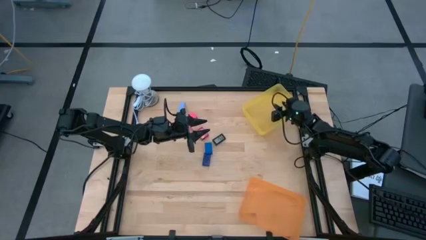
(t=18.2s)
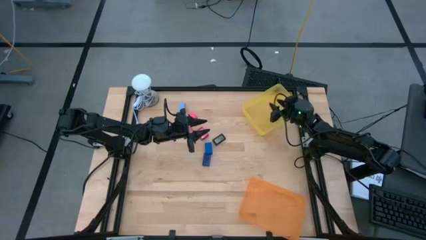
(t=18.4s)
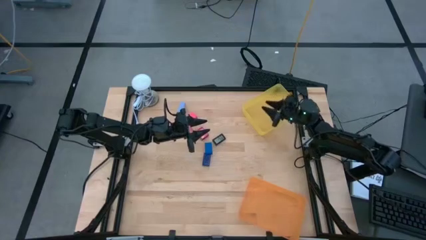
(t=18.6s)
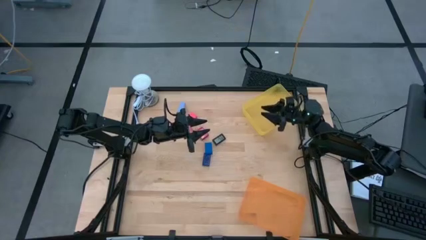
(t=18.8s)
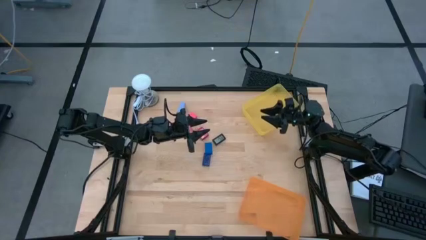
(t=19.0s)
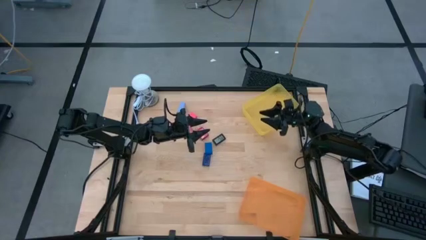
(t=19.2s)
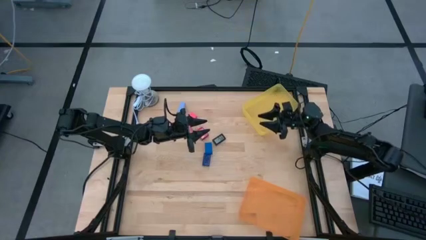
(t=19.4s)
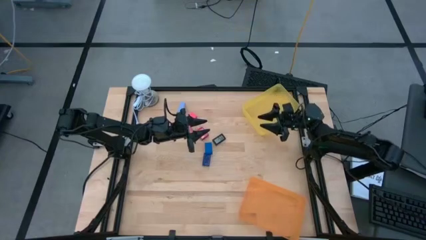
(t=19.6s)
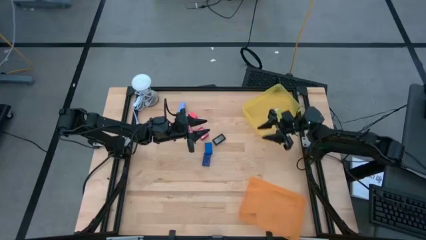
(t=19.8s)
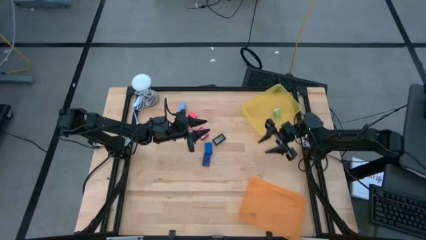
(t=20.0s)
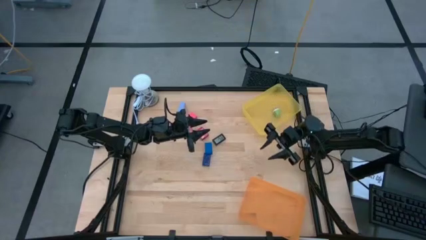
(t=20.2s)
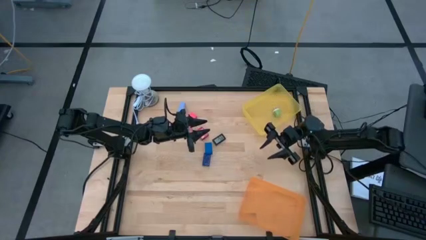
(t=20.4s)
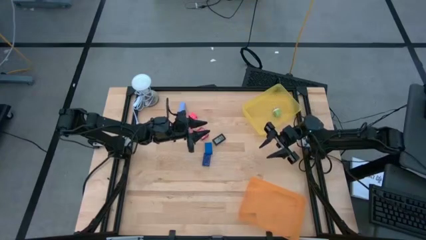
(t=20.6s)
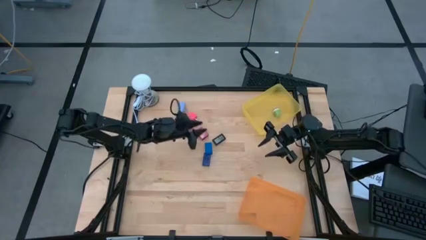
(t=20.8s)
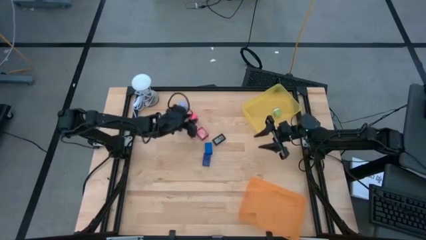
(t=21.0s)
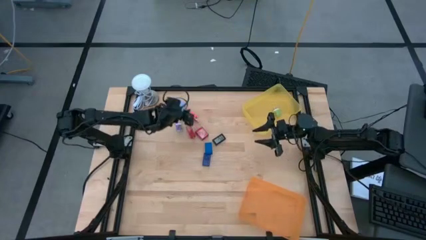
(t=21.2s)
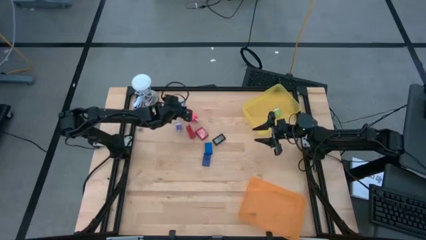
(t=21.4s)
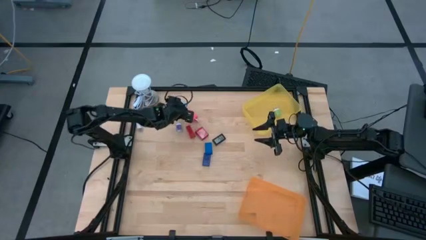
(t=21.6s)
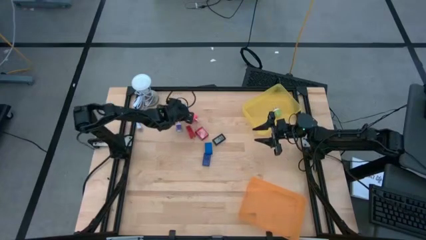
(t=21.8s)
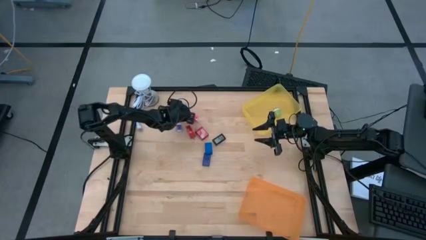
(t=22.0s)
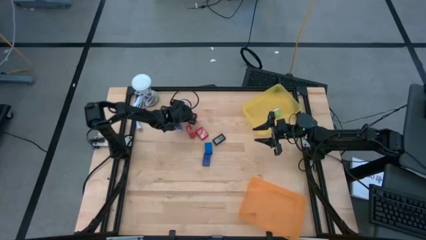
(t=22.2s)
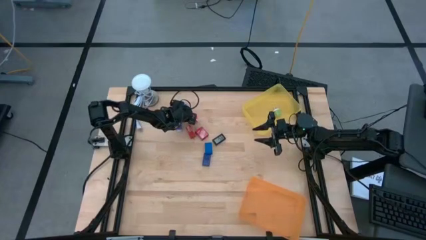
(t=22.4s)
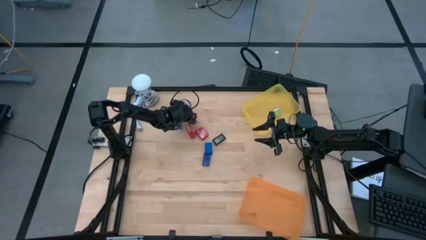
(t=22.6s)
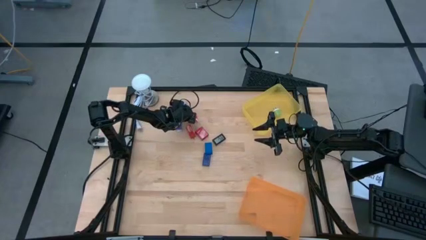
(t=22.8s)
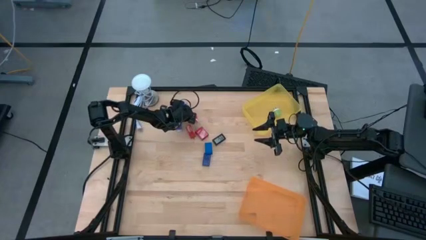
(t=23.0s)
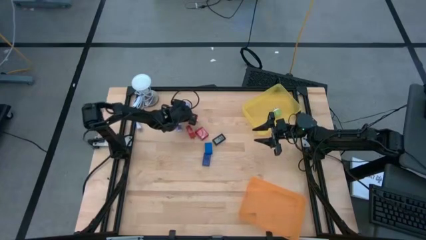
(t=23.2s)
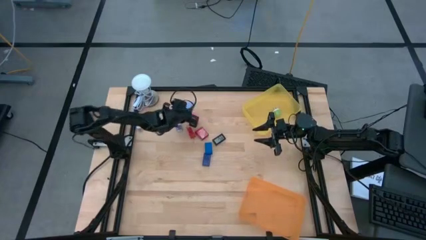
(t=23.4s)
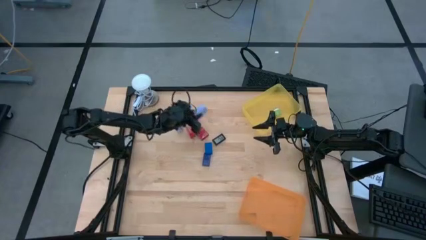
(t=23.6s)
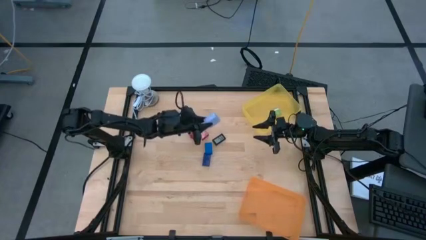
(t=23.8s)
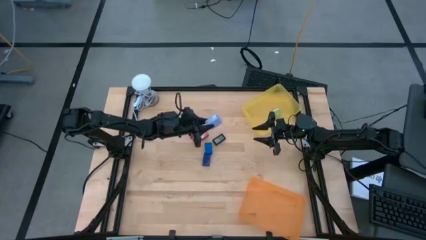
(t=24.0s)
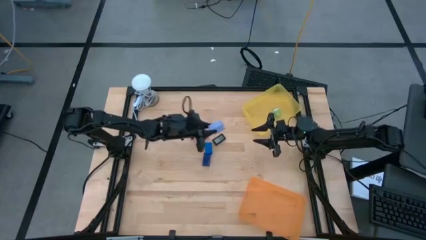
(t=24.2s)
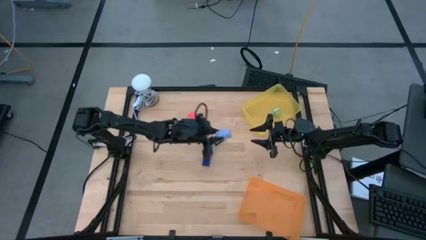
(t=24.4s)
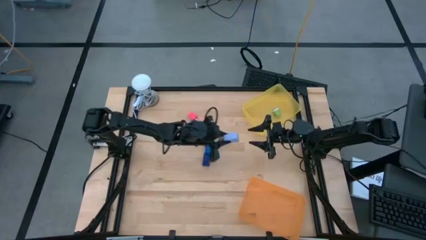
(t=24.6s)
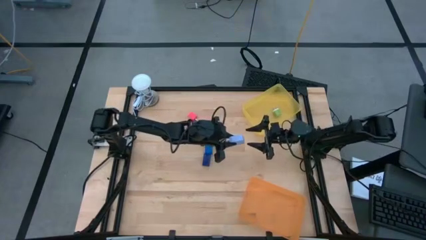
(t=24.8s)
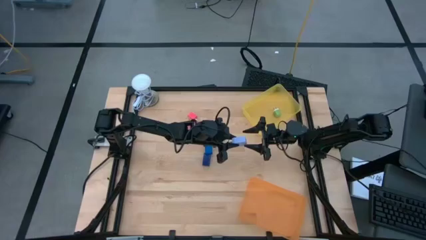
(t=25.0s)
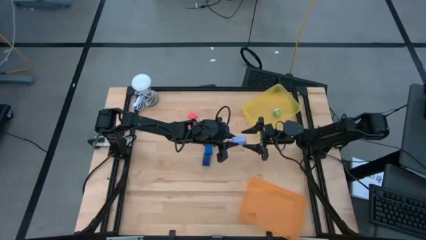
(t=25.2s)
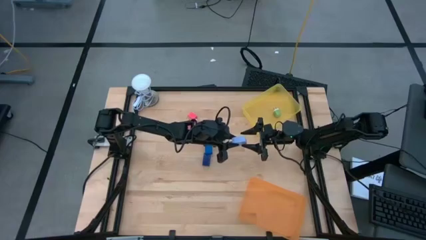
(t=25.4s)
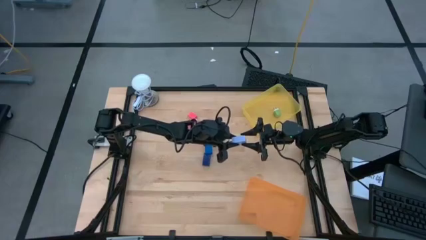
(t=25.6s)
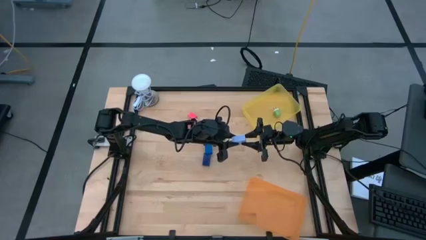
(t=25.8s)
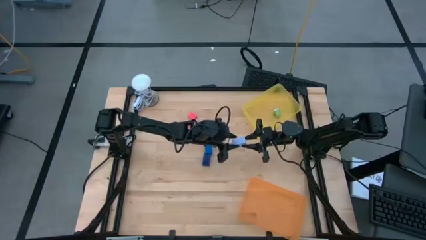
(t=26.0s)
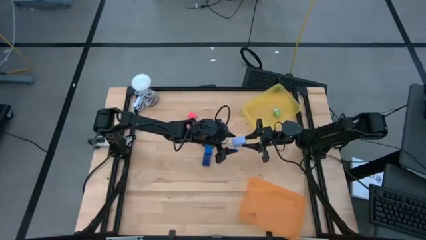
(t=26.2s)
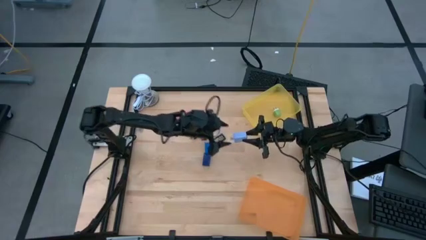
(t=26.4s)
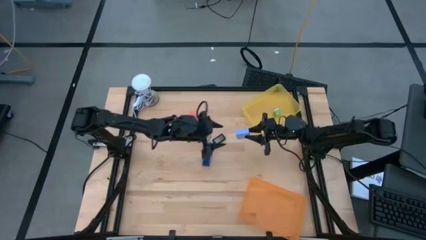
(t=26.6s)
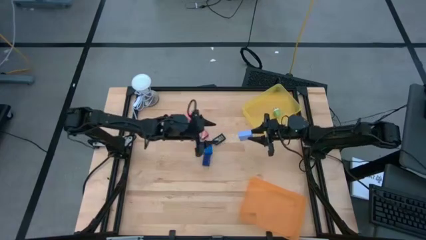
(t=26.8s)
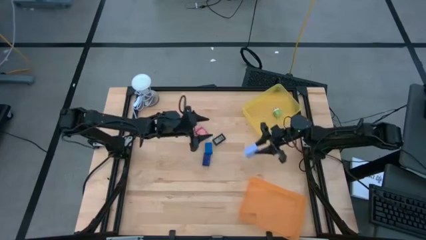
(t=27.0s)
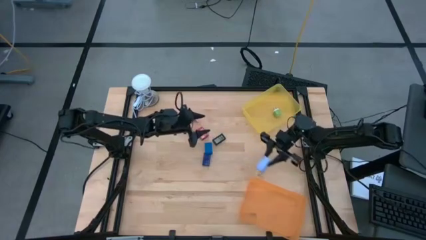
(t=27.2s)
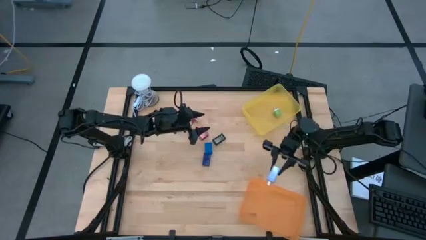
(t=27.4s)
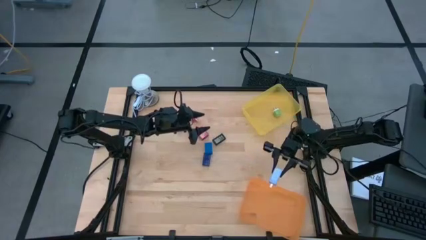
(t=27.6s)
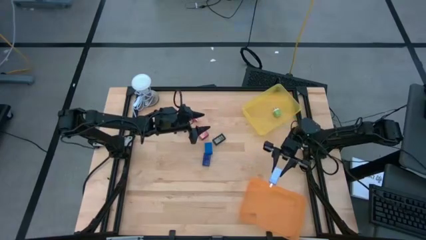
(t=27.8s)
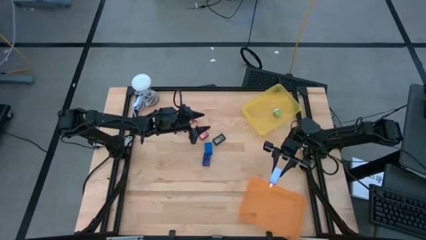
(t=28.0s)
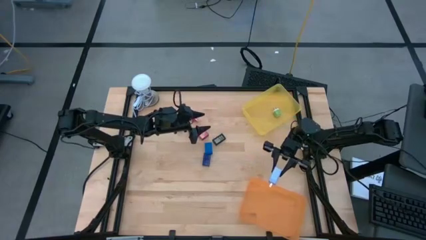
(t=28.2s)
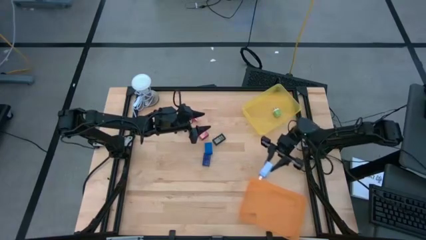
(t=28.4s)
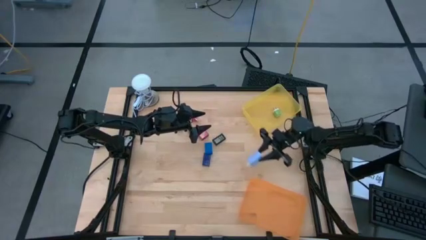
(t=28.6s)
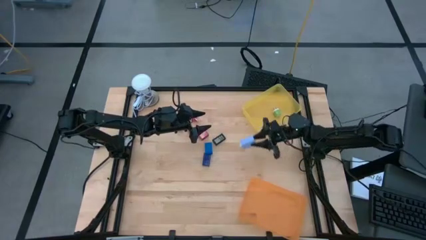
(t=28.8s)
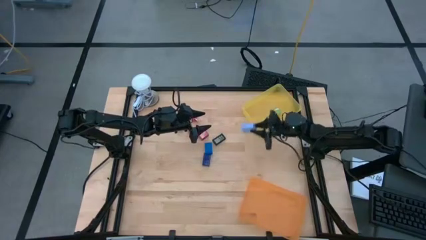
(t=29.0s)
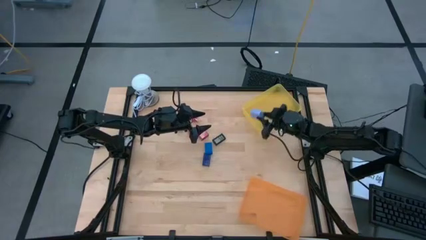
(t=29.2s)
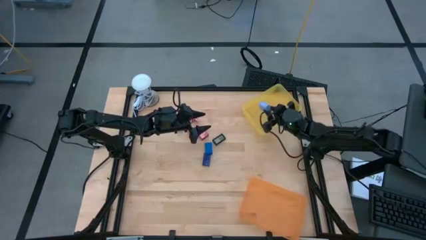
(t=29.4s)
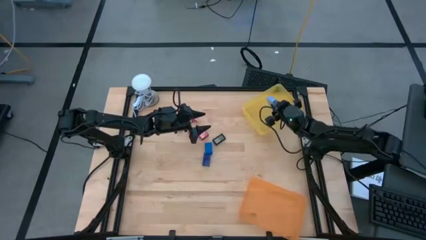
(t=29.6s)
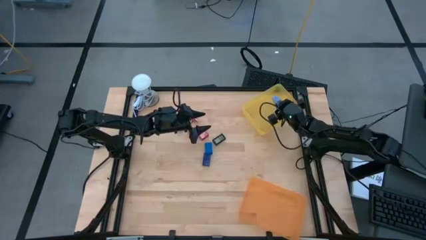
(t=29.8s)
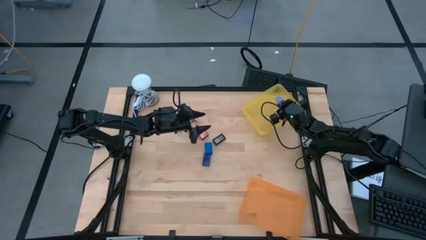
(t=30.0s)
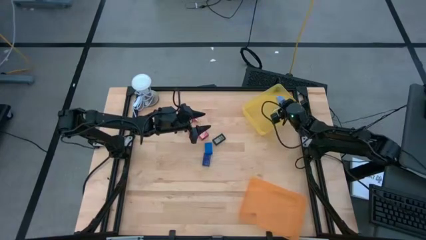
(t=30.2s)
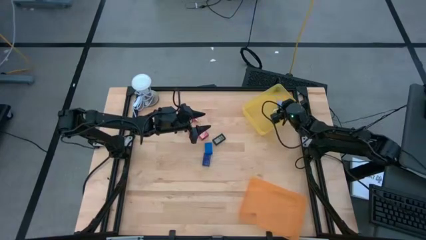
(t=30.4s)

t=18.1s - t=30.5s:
Task: Pick & Place Office items
Put the light purple charger adapter into the yellow bin
